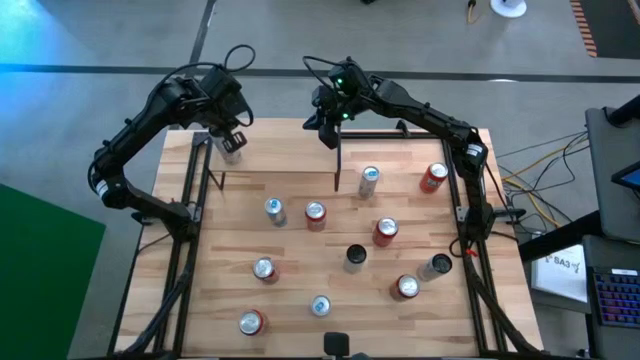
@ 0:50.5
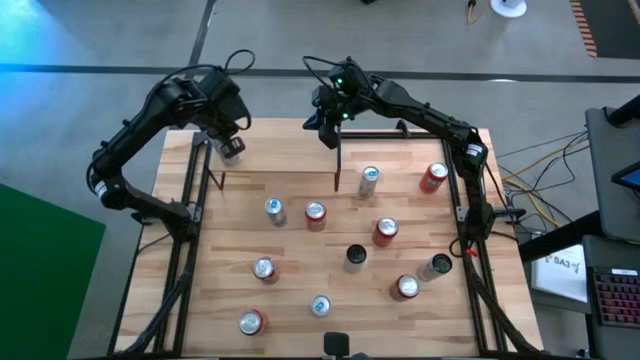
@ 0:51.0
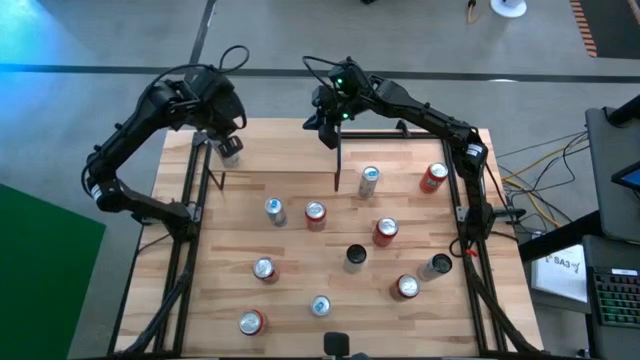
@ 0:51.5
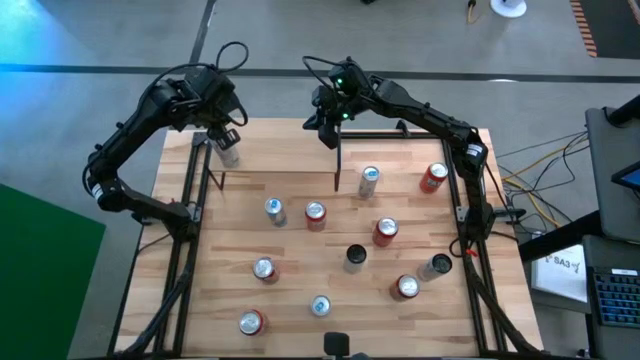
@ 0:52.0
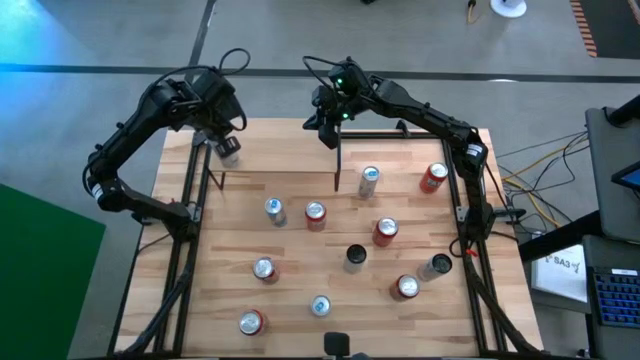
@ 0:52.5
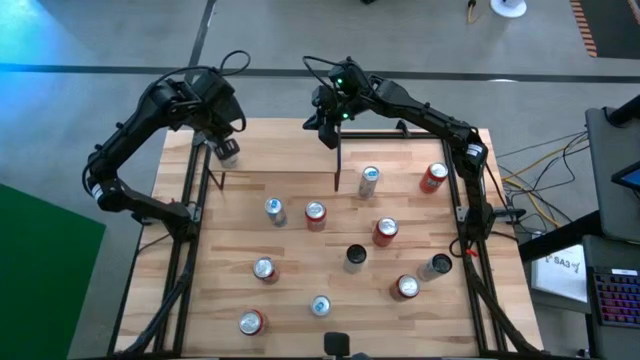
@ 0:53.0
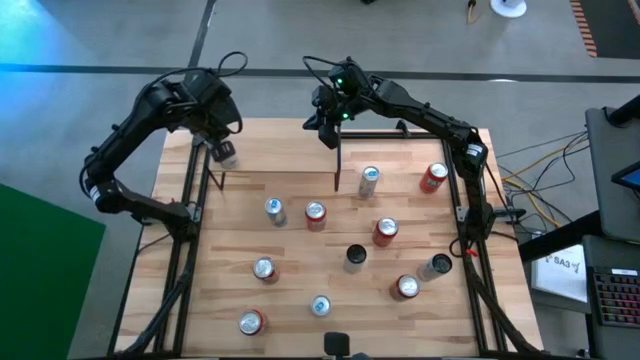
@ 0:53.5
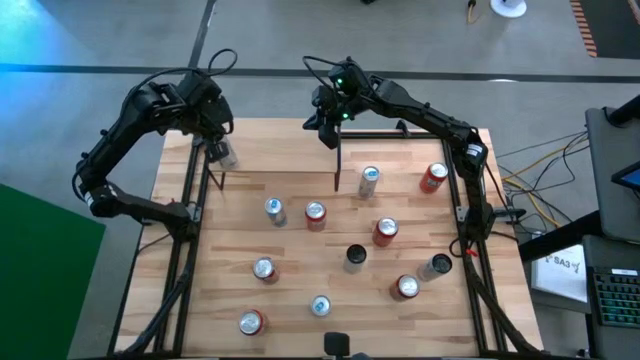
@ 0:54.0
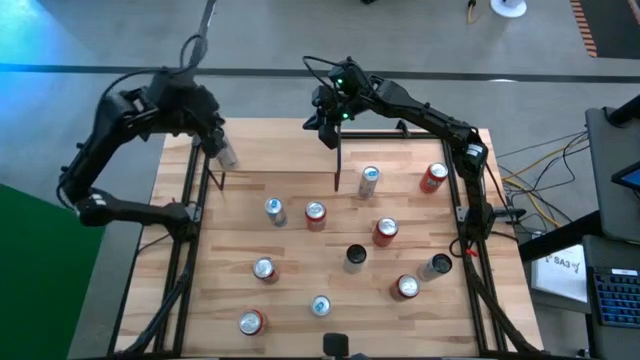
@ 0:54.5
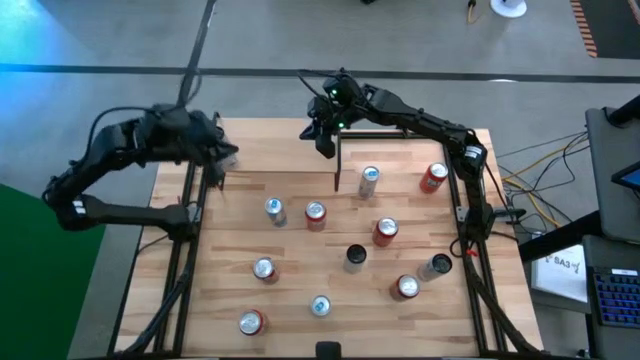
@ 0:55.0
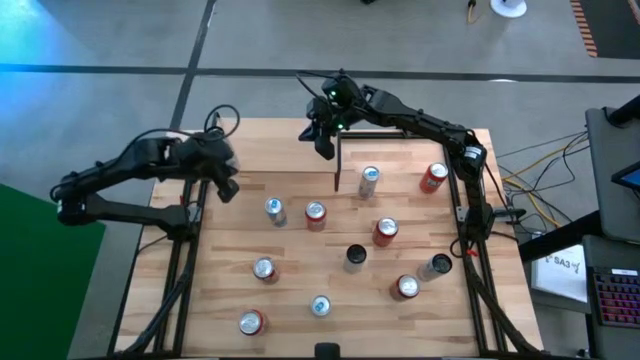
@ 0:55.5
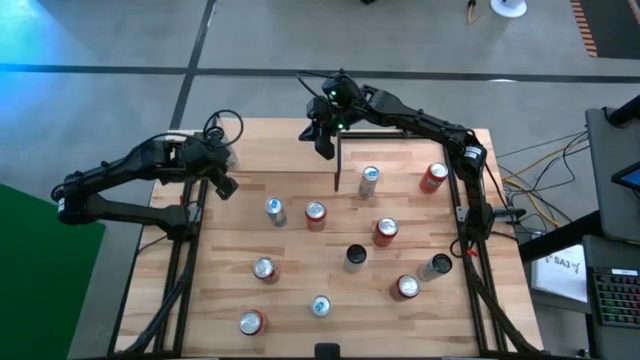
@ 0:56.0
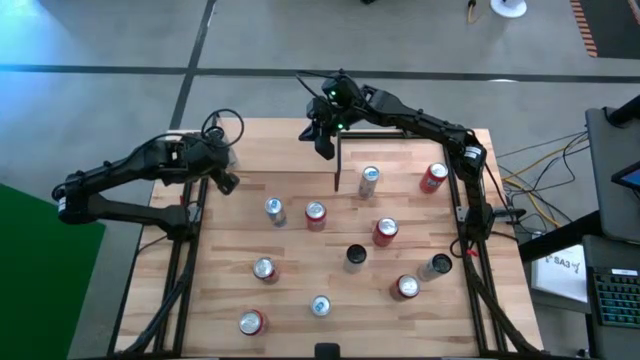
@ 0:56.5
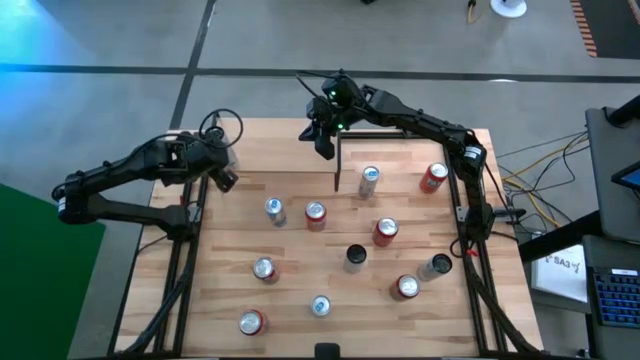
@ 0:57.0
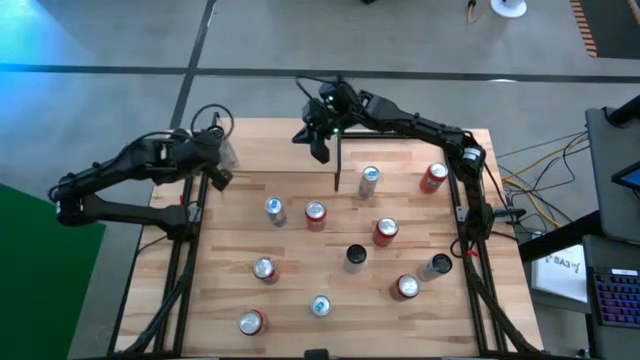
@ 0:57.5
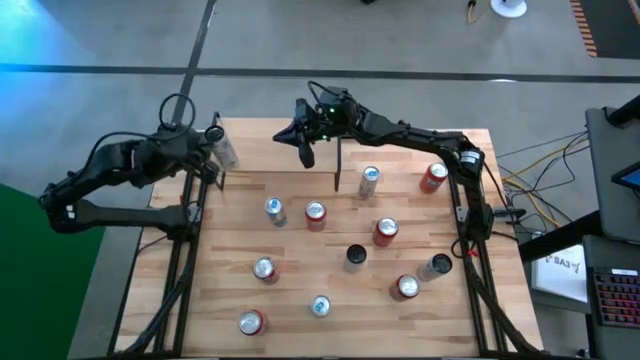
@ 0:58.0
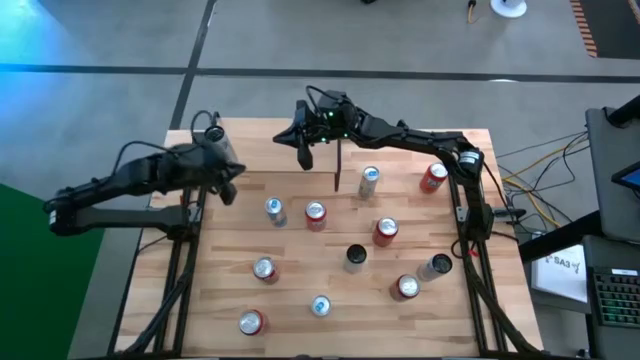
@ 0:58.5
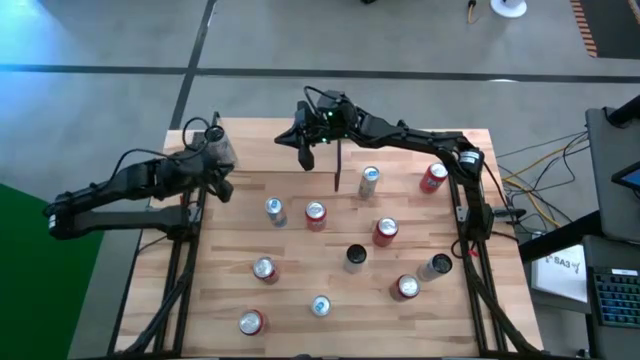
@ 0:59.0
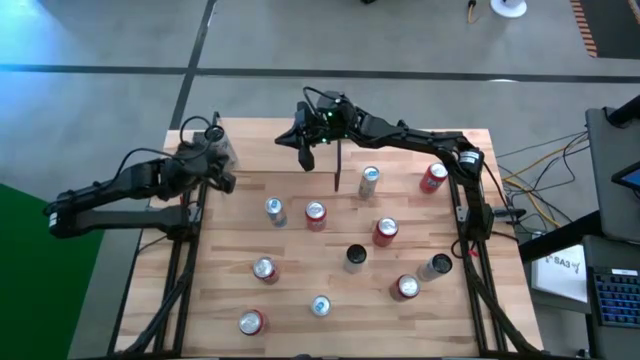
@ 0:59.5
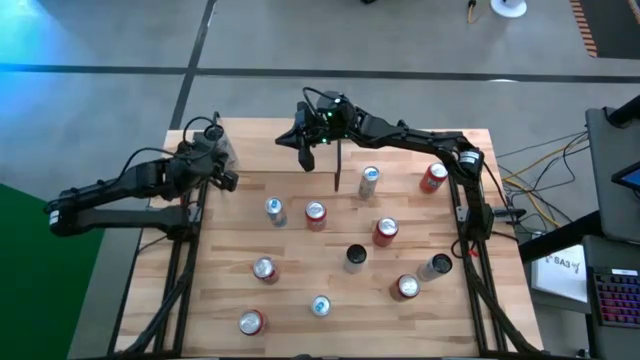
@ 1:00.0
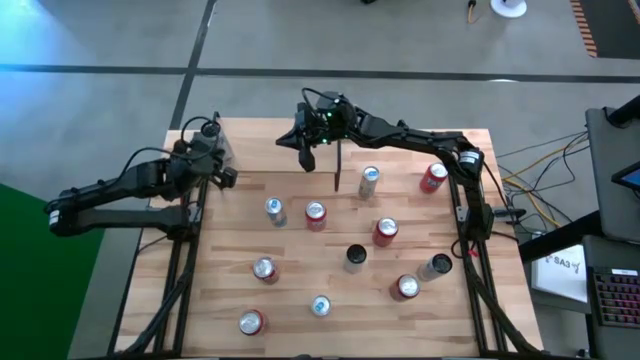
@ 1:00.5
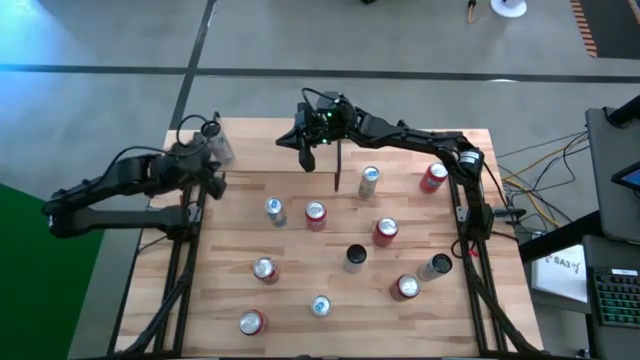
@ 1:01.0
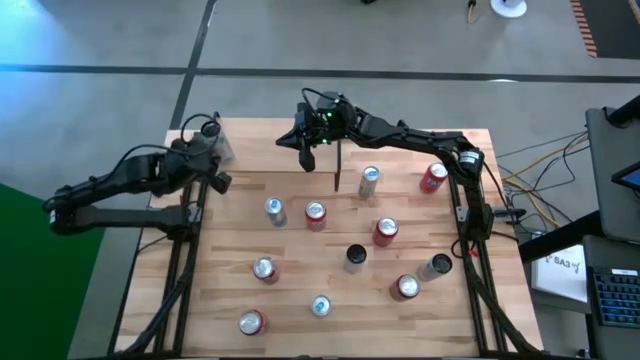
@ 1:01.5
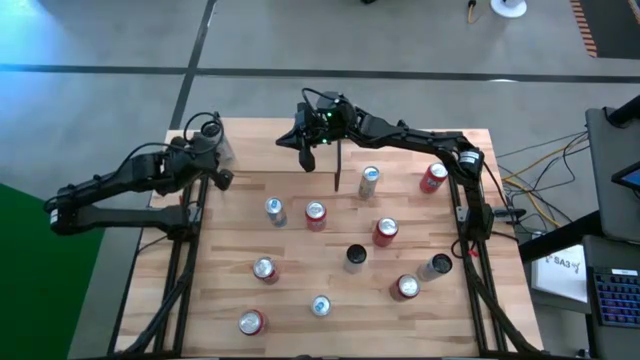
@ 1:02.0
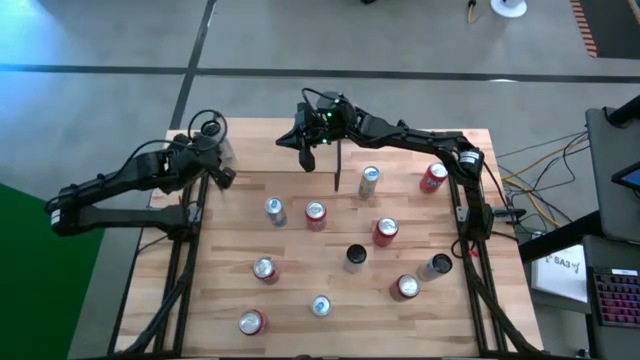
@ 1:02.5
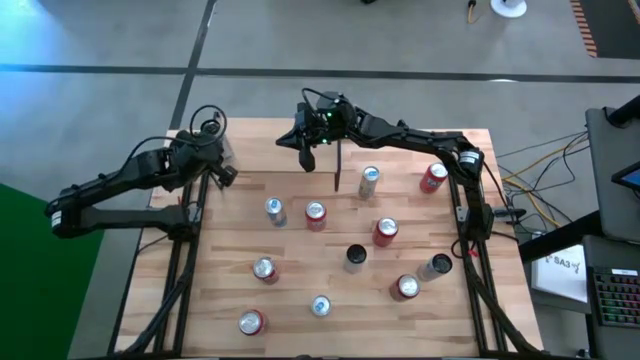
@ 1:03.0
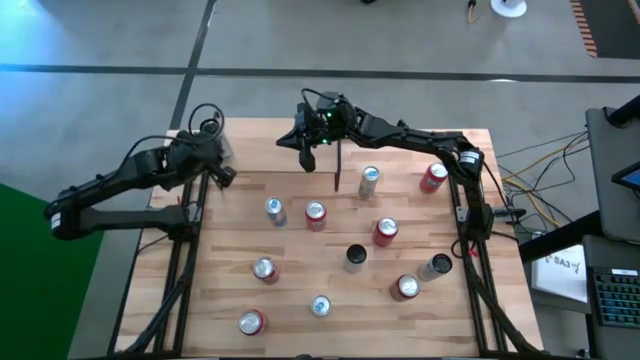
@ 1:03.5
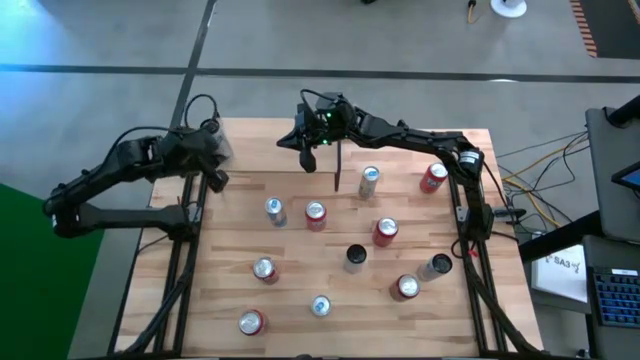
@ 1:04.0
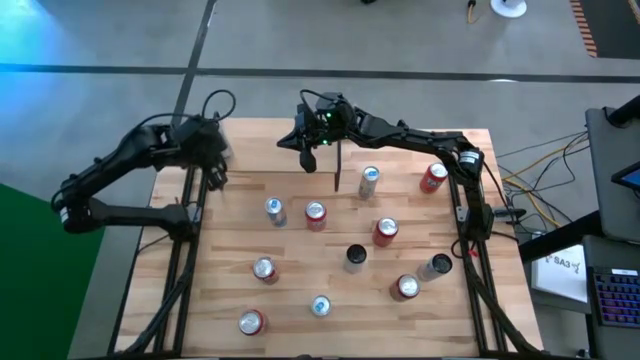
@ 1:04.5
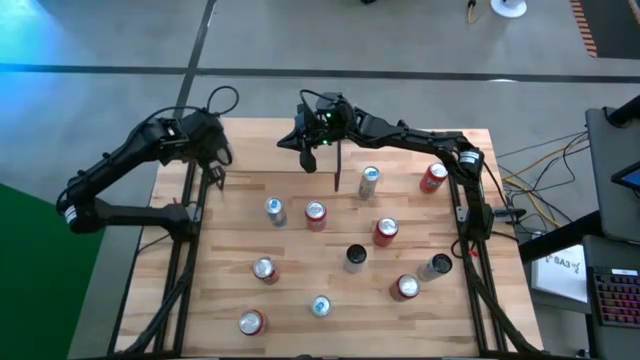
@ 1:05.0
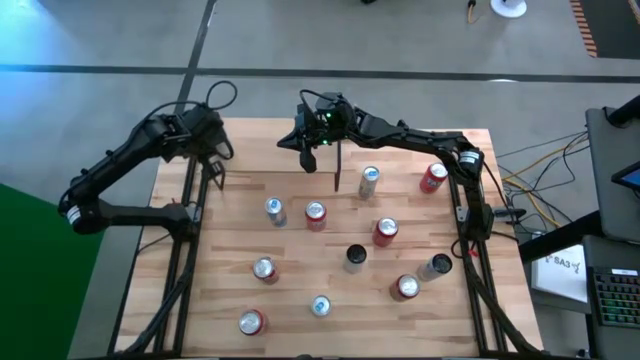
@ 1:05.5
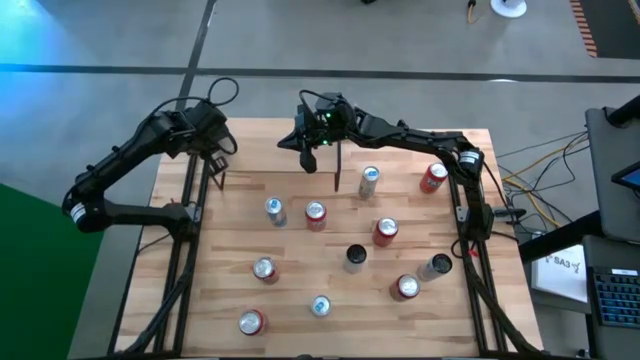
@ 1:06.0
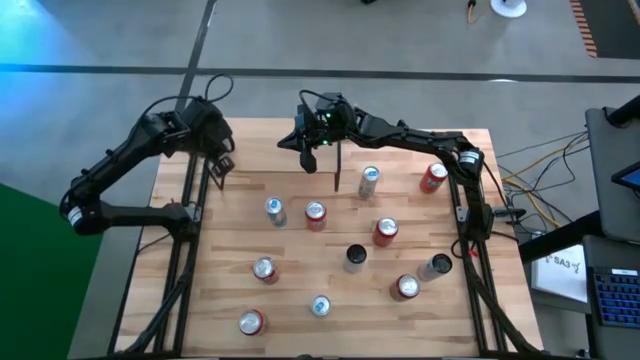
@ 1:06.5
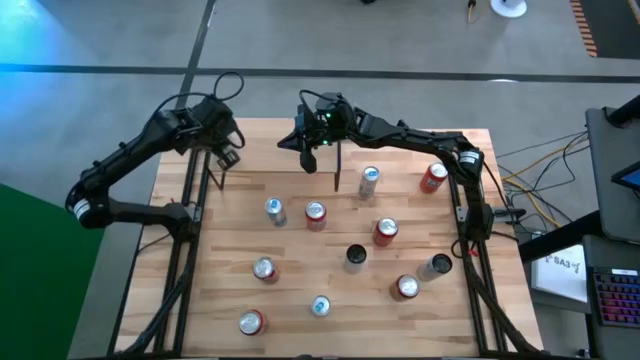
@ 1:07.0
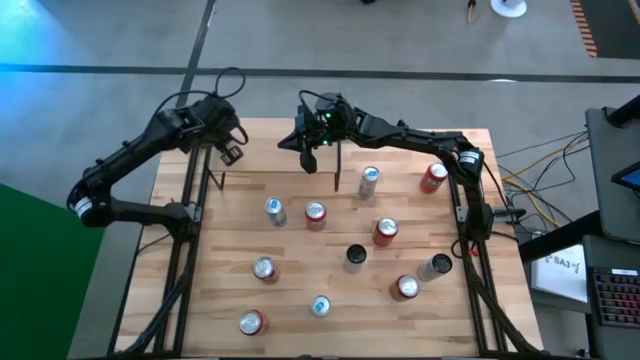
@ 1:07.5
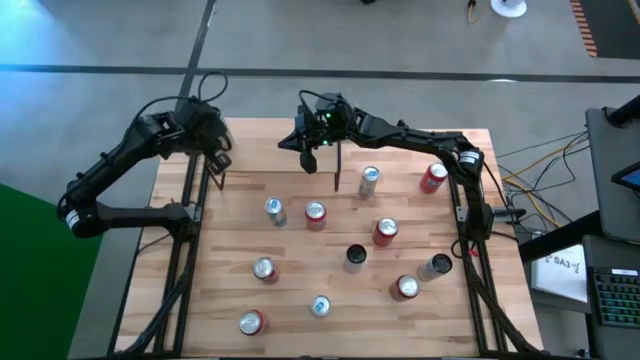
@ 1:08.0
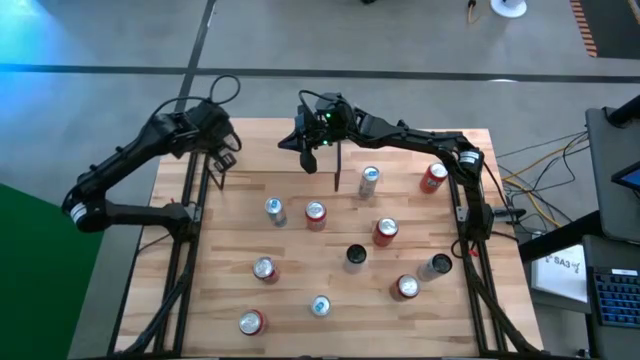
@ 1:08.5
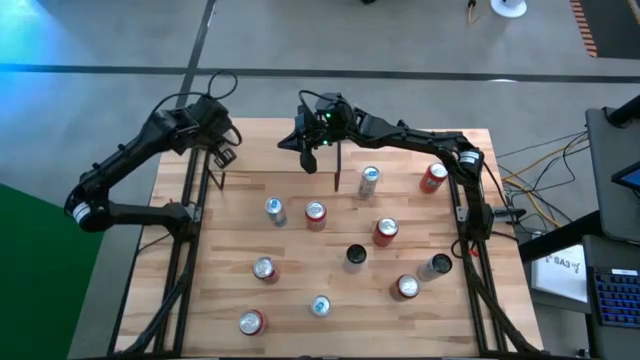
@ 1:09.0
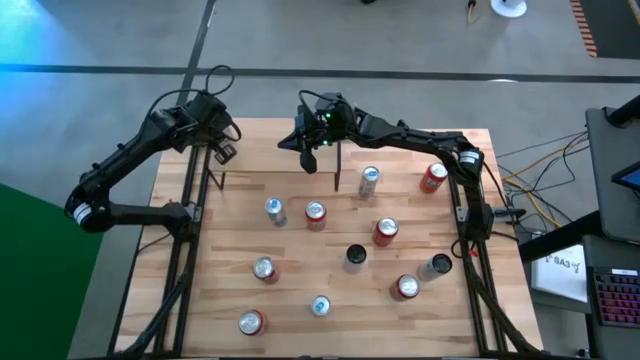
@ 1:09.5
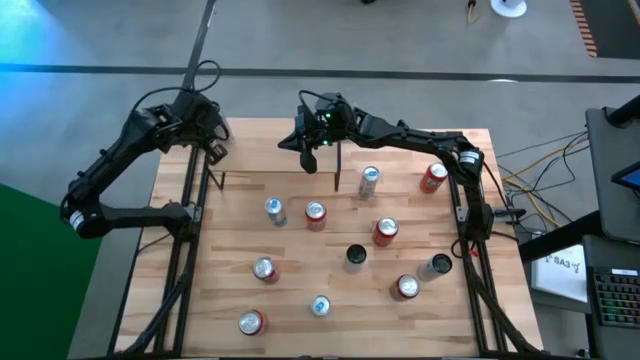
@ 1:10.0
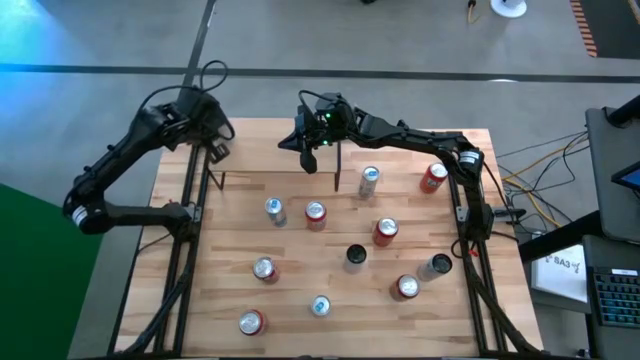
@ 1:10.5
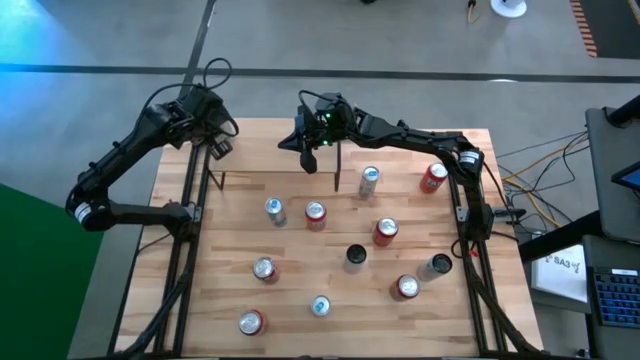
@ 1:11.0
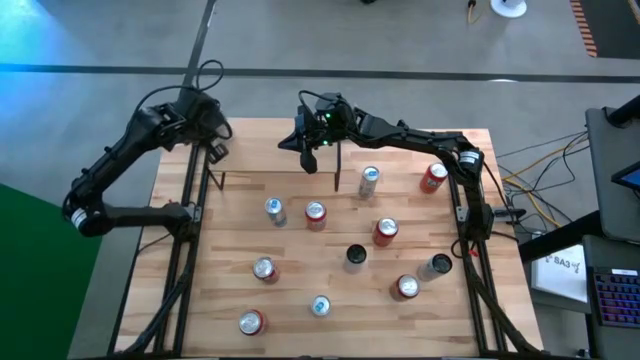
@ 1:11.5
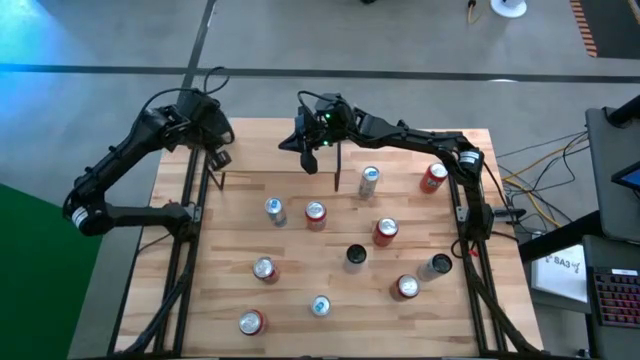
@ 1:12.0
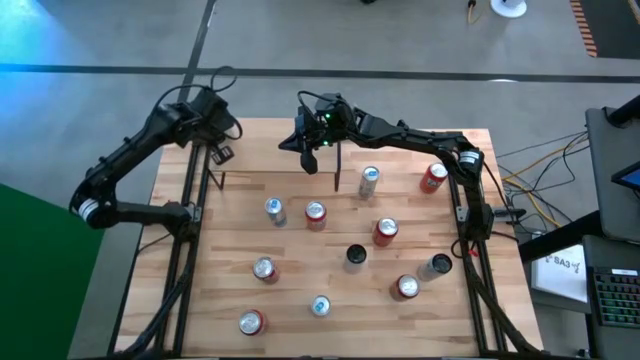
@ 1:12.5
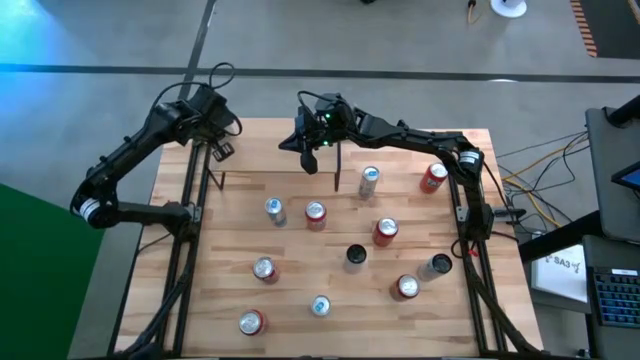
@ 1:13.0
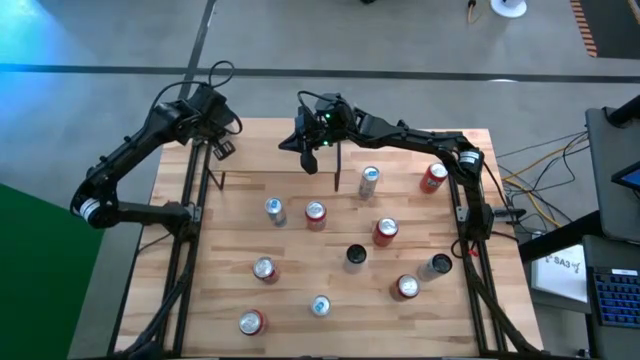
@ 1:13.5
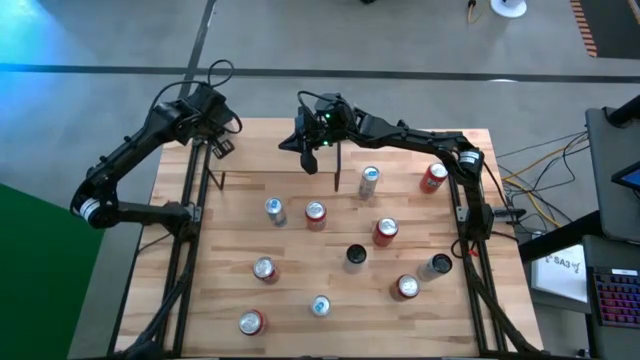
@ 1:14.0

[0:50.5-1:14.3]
Task: Place canned beverage on shelf
Put the white pink soda can on the shelf
